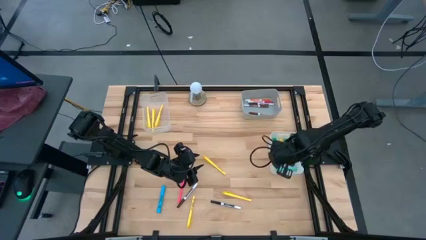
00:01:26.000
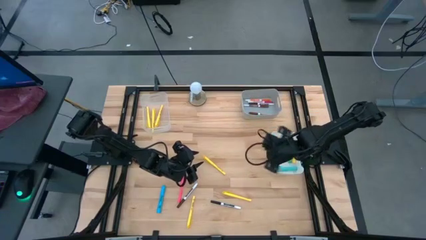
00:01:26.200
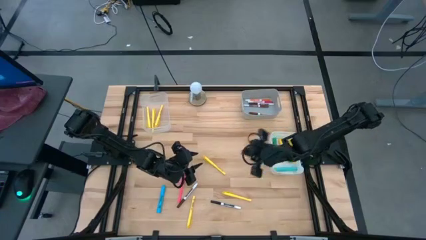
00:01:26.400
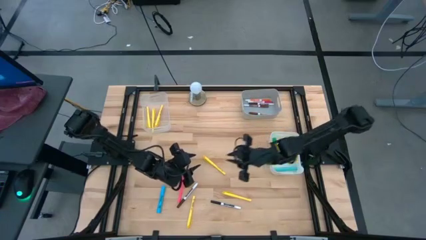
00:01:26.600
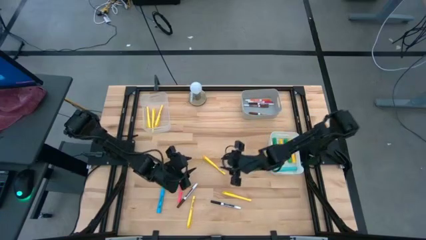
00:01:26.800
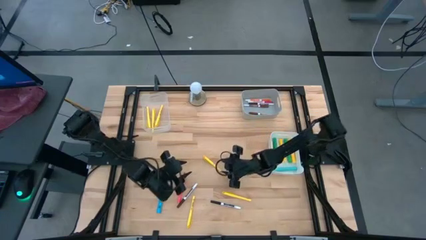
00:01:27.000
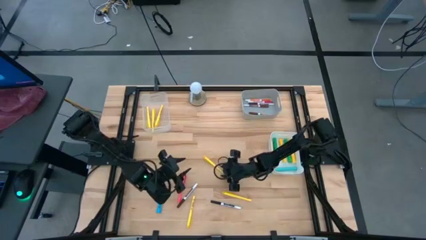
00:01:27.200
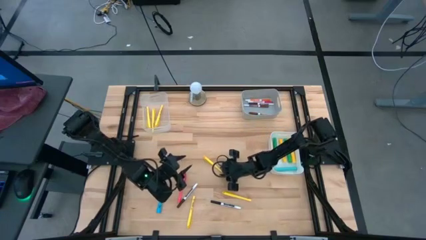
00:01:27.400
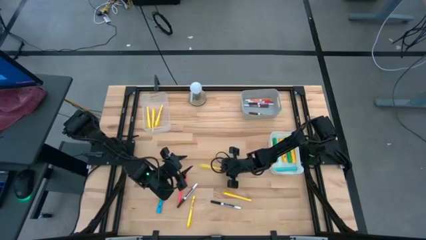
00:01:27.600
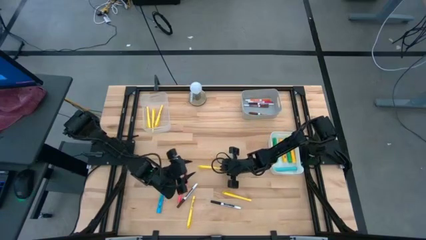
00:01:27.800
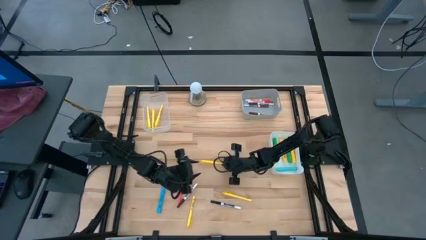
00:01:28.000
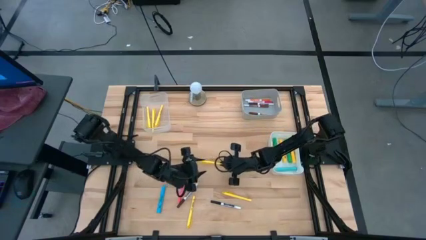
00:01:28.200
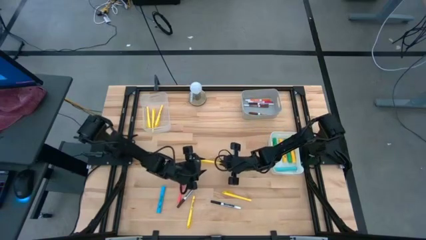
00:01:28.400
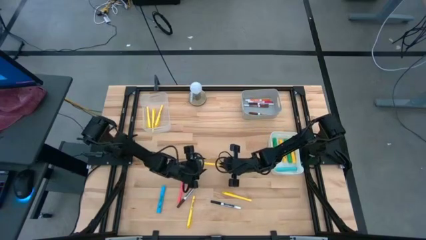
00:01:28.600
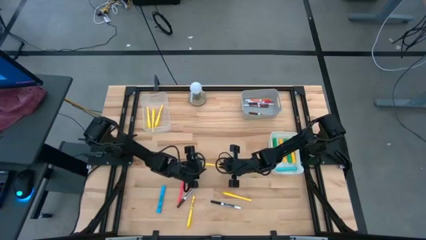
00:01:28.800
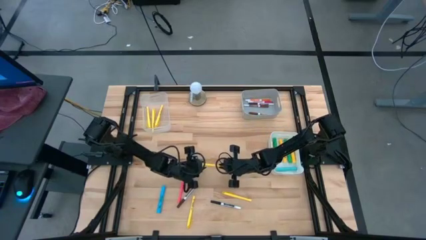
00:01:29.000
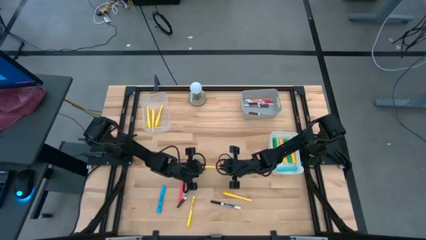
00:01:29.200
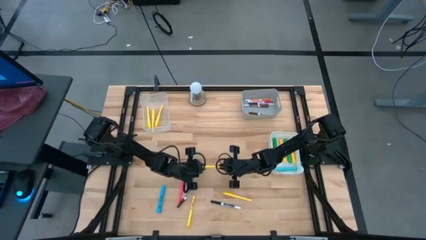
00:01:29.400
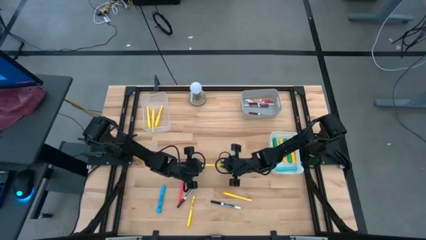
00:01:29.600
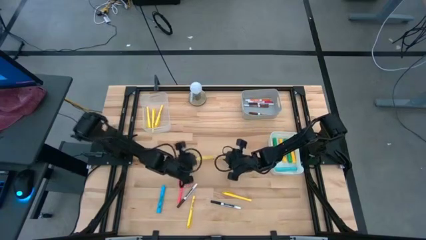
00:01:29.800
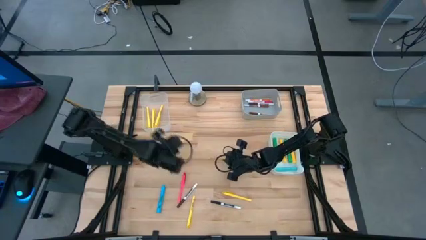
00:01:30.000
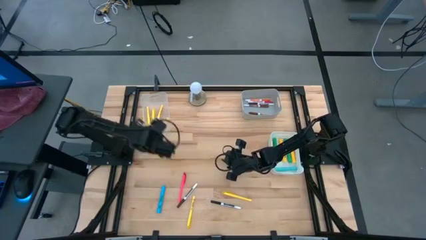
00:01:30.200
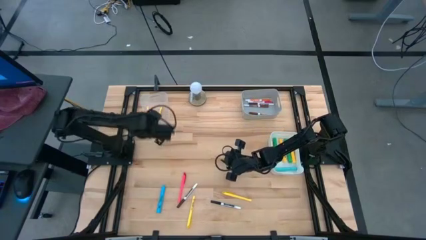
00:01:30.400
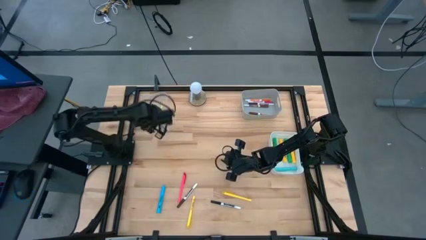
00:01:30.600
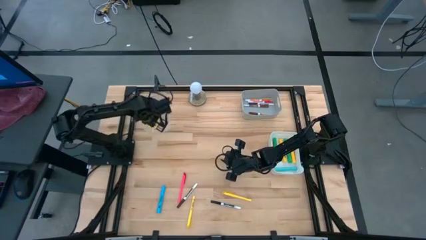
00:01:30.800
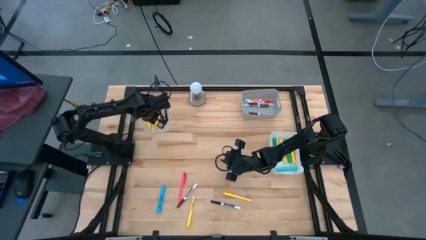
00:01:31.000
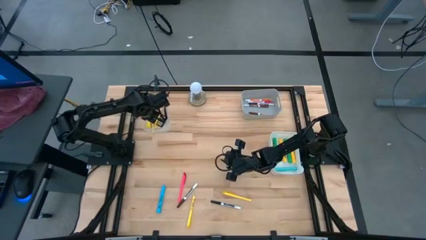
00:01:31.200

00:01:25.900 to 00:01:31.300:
Task: Pick & Place Markers
Put the yellow pen into the transparent bin

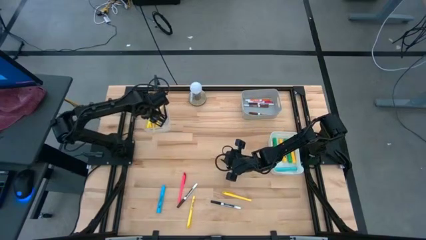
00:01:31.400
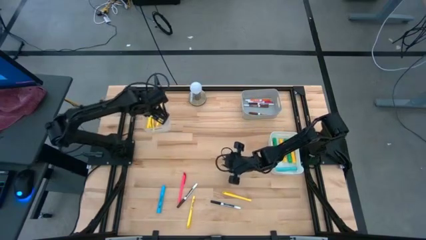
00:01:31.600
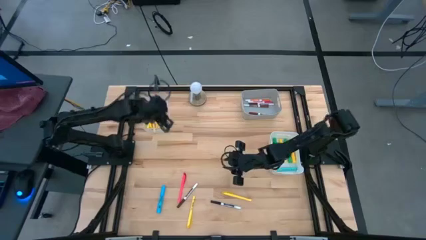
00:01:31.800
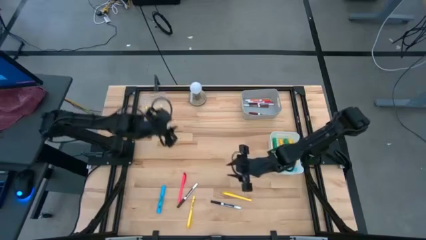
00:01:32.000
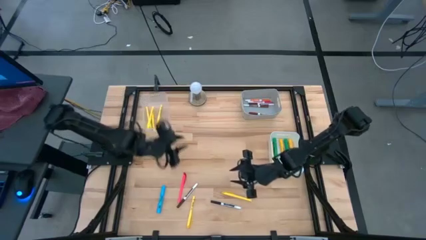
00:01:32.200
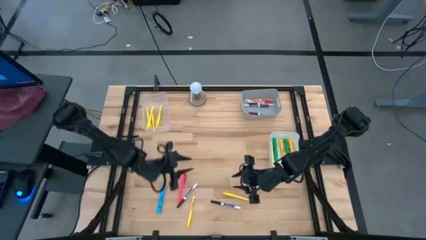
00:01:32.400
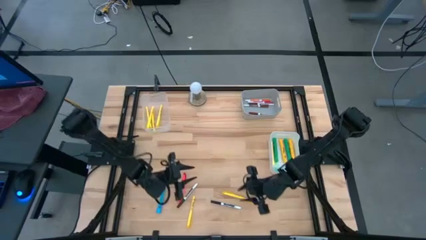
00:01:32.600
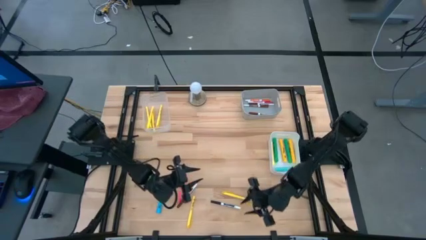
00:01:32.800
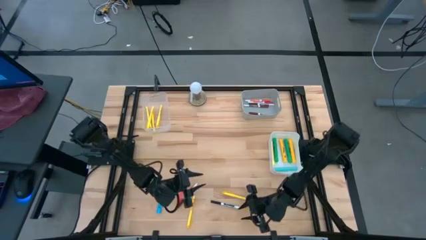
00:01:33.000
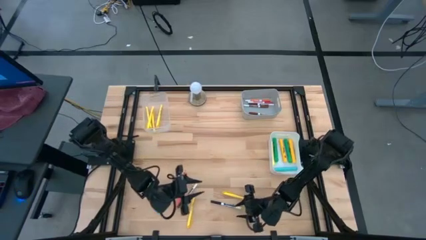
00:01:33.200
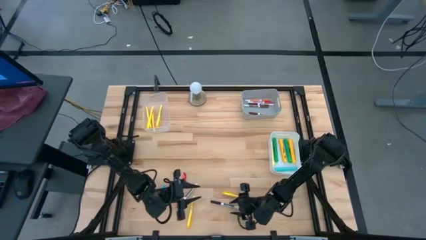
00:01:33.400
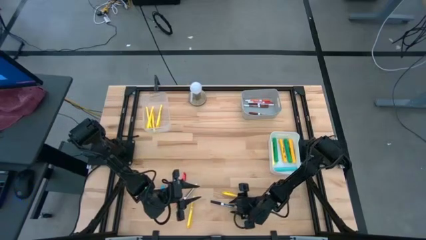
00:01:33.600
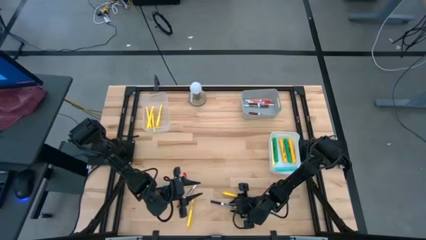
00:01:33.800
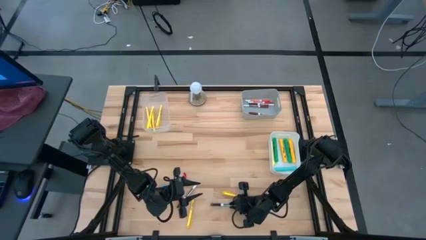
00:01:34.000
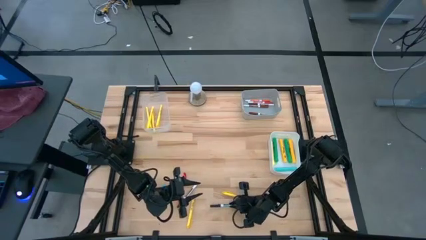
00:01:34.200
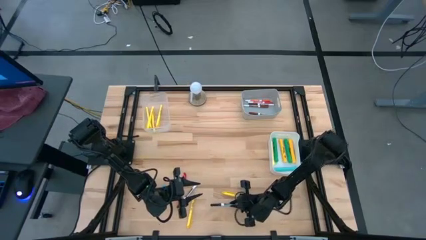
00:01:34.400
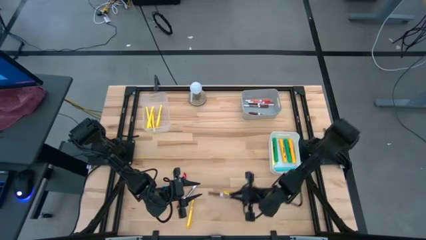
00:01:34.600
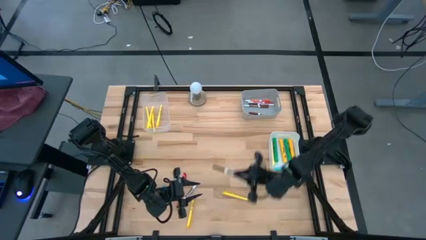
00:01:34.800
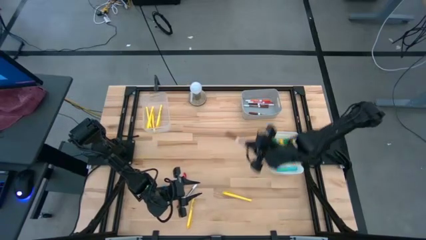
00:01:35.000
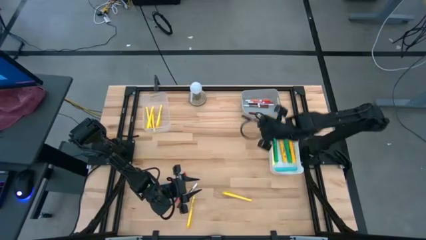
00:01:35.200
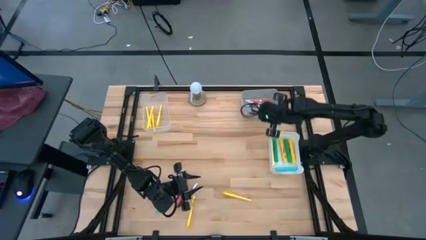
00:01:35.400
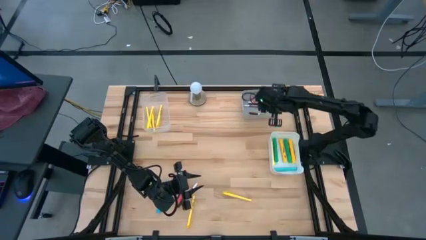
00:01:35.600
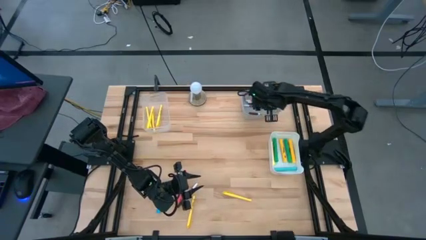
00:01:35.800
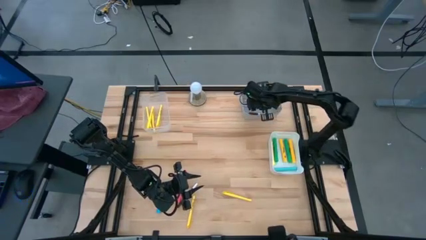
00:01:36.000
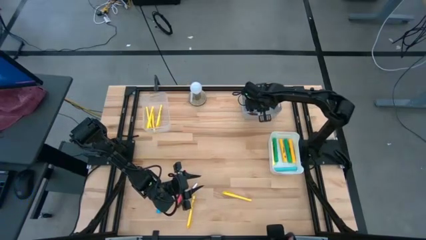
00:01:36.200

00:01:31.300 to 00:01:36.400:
Put the black marker pen into the gray bin

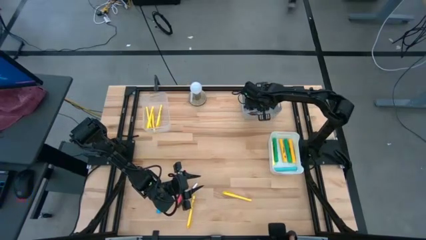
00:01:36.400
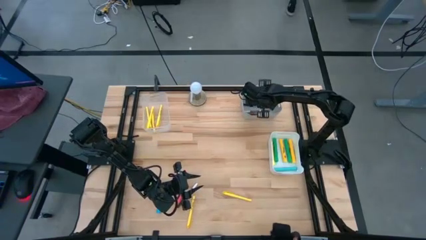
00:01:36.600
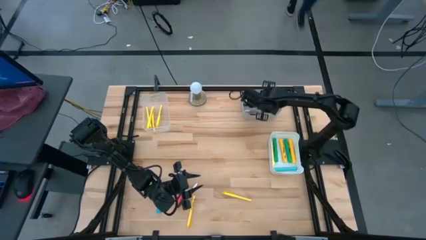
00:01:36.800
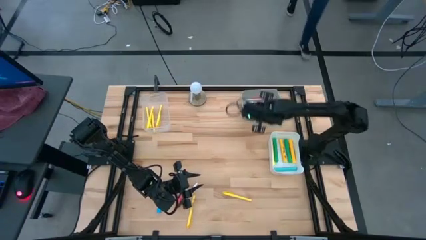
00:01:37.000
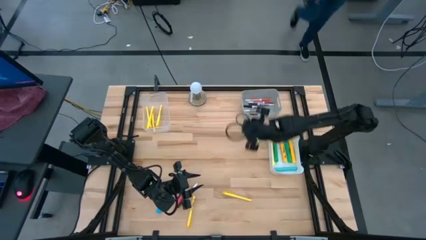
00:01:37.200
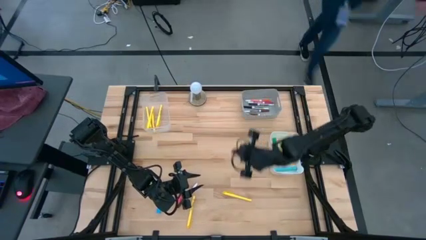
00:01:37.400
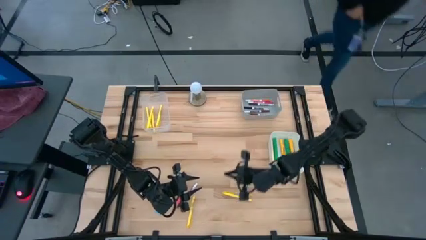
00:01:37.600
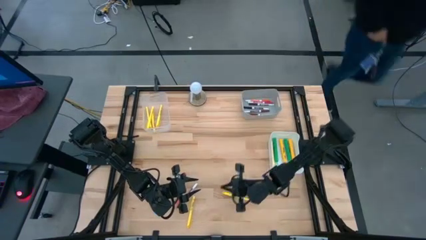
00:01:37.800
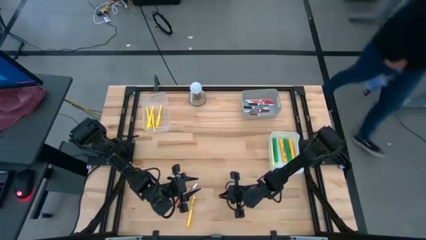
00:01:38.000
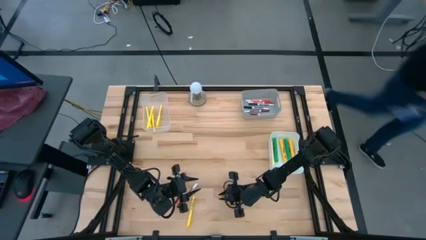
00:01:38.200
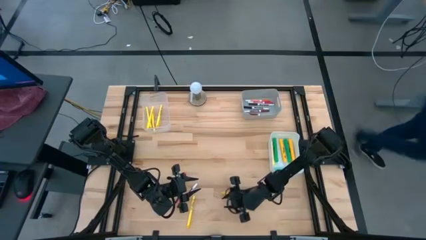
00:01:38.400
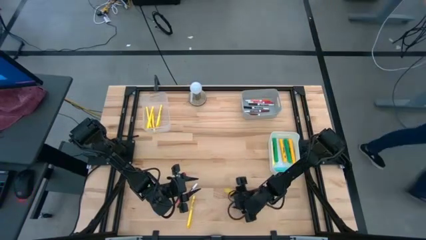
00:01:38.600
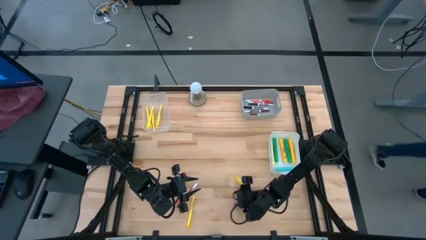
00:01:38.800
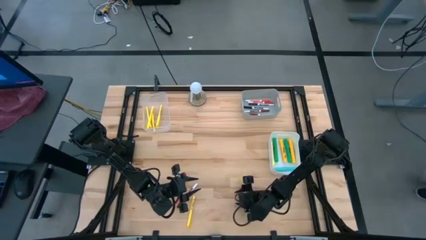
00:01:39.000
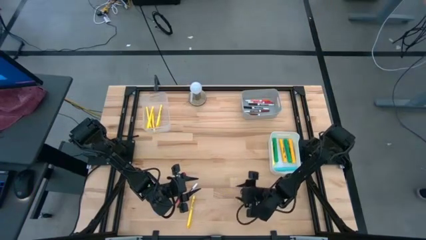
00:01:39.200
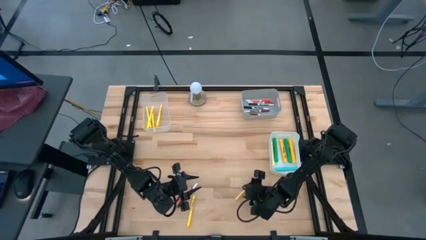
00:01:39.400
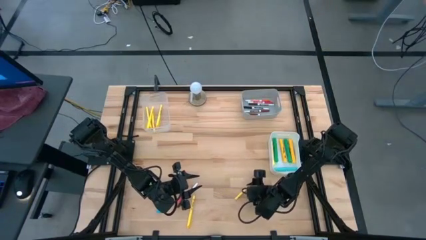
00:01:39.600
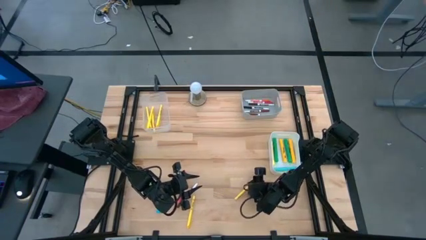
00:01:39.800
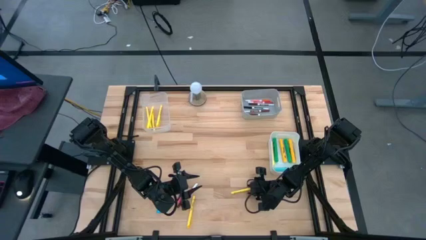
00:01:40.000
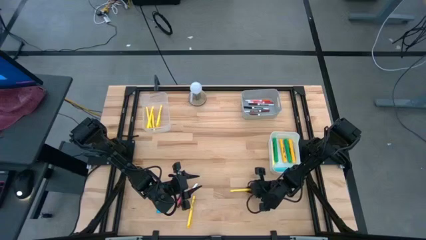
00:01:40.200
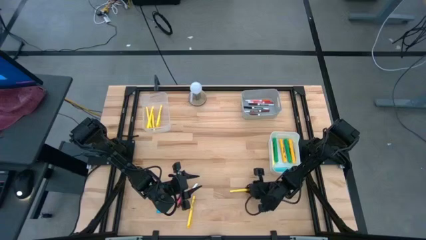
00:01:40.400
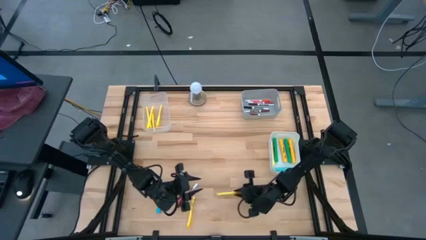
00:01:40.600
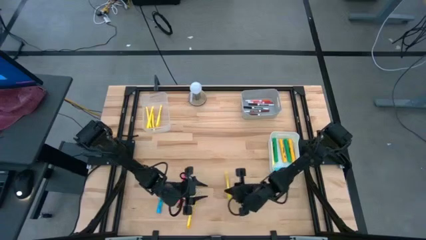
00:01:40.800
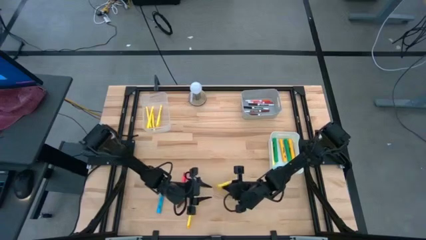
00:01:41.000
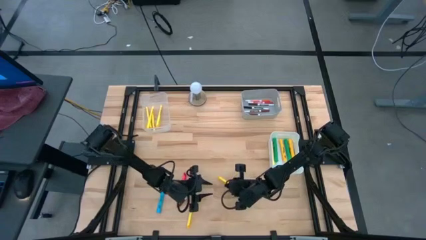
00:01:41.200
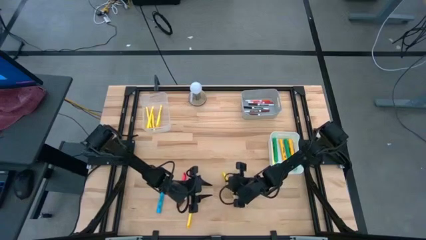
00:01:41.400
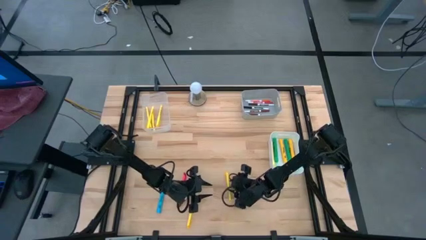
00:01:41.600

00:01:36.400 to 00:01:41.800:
Put the yellow pen into the transparent bin
